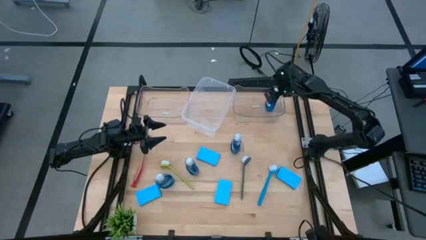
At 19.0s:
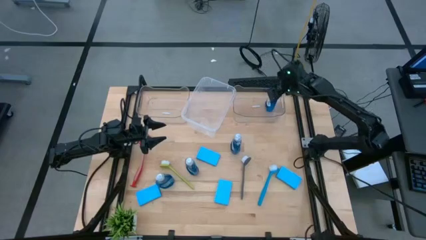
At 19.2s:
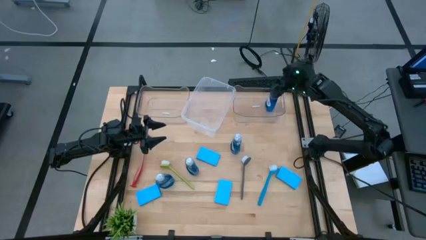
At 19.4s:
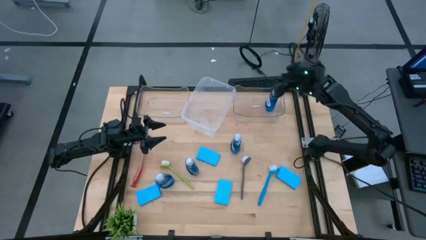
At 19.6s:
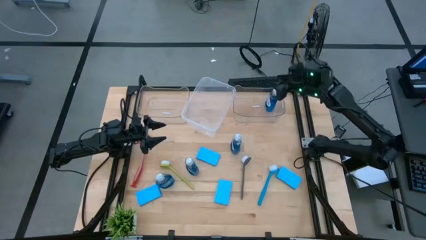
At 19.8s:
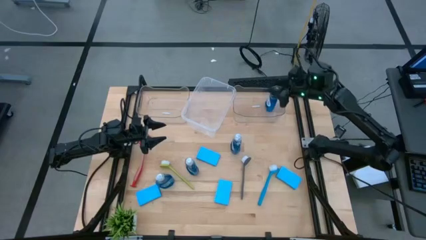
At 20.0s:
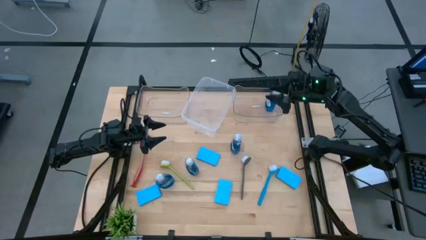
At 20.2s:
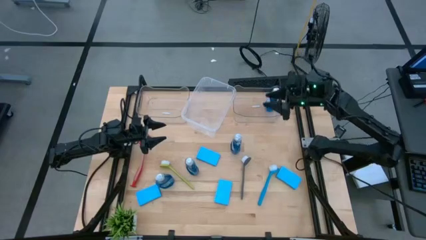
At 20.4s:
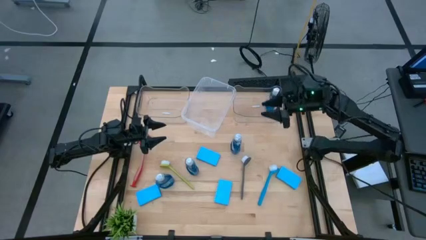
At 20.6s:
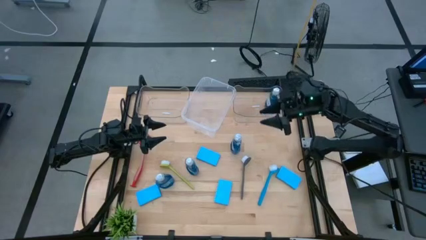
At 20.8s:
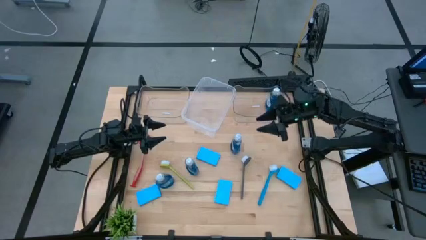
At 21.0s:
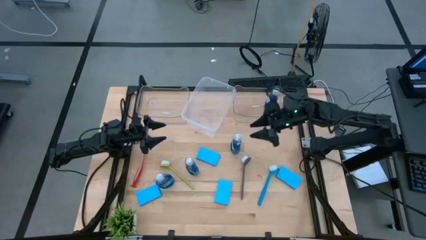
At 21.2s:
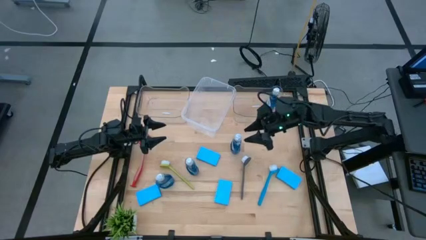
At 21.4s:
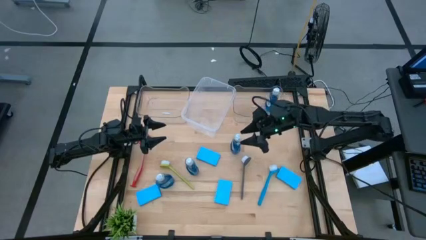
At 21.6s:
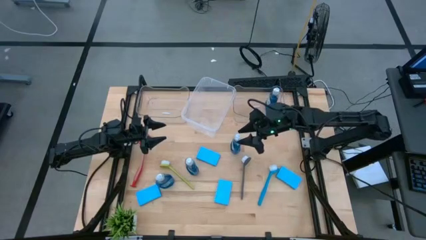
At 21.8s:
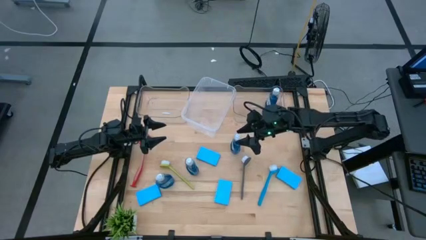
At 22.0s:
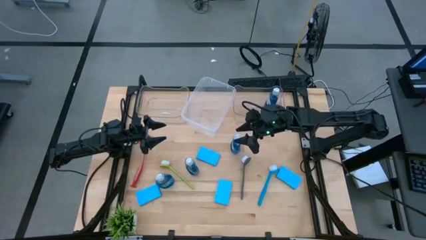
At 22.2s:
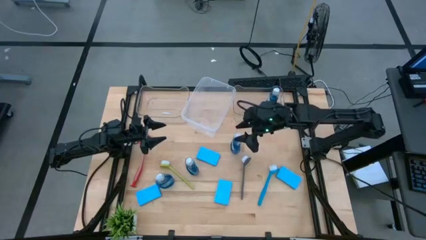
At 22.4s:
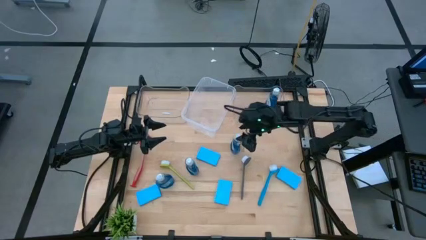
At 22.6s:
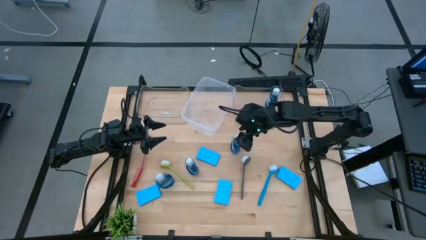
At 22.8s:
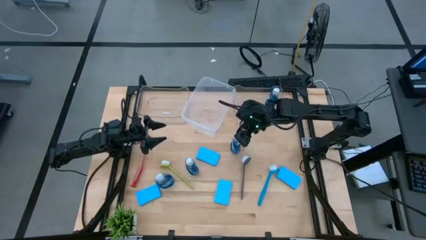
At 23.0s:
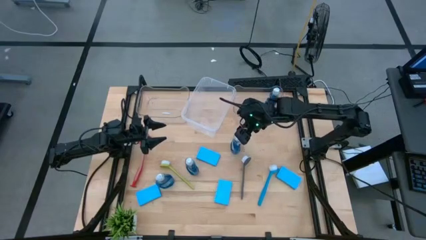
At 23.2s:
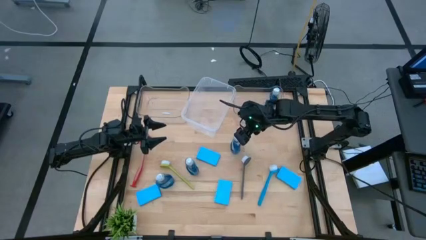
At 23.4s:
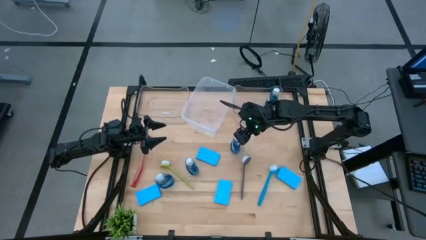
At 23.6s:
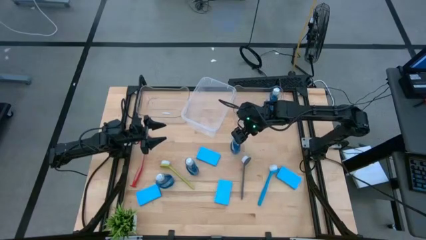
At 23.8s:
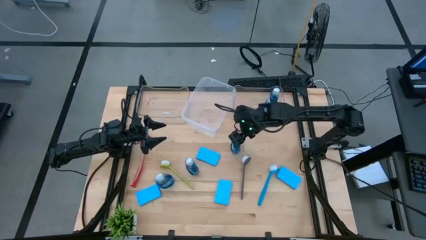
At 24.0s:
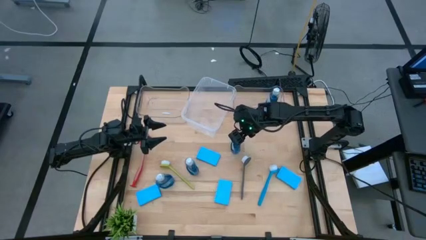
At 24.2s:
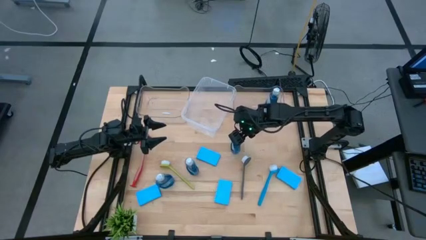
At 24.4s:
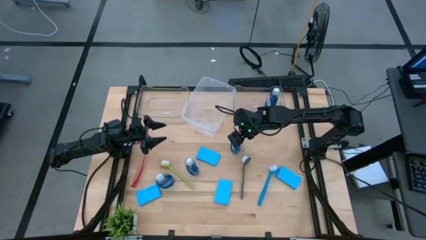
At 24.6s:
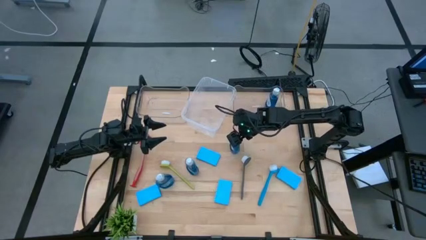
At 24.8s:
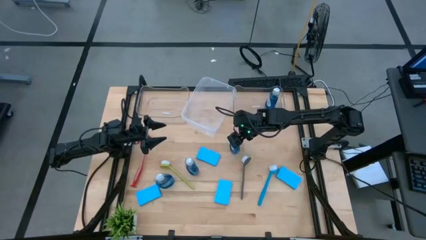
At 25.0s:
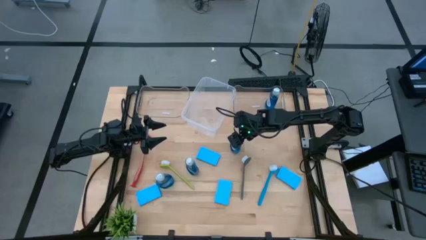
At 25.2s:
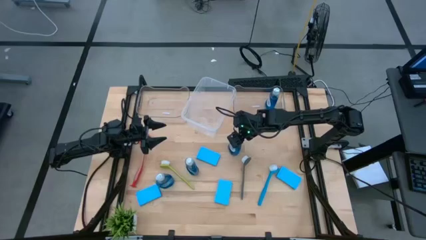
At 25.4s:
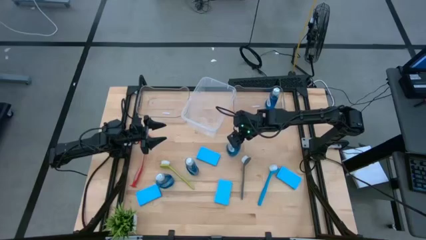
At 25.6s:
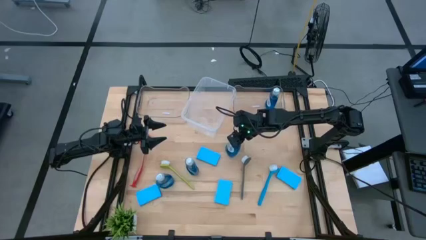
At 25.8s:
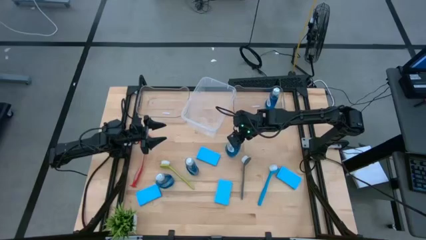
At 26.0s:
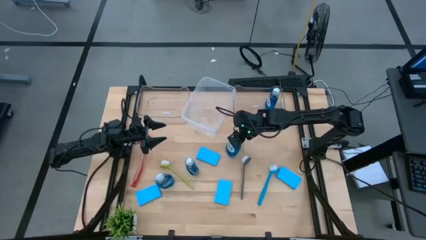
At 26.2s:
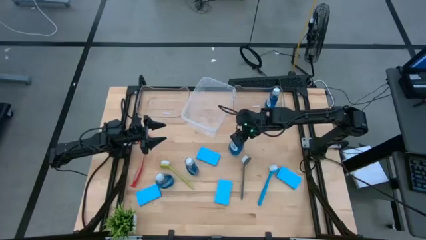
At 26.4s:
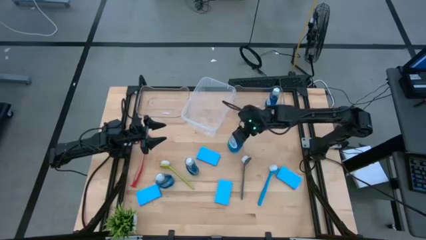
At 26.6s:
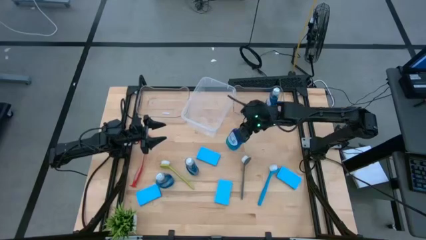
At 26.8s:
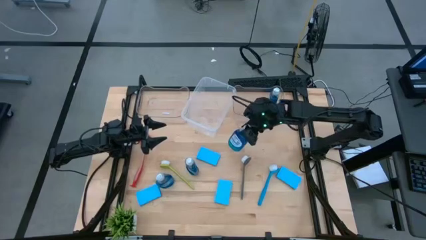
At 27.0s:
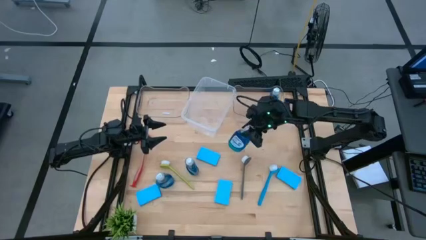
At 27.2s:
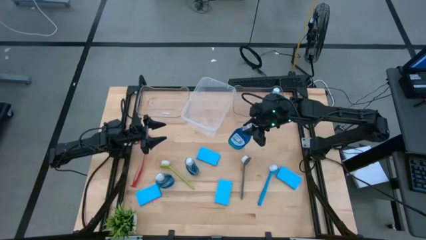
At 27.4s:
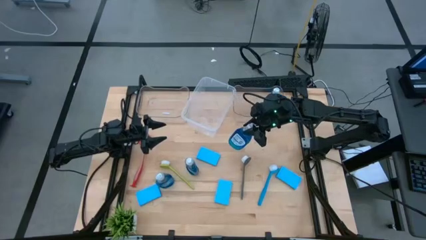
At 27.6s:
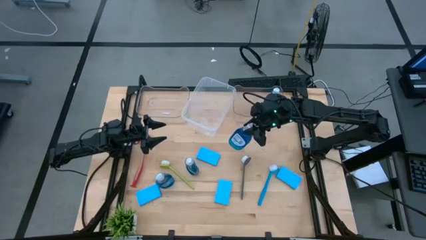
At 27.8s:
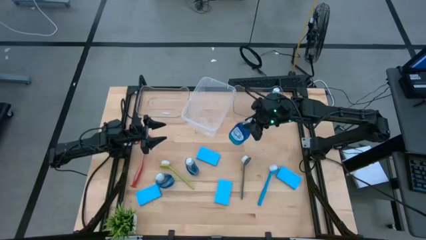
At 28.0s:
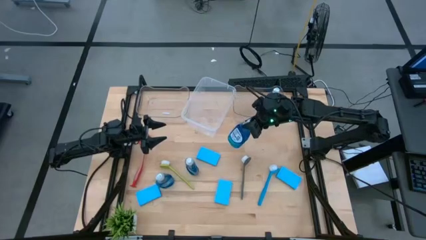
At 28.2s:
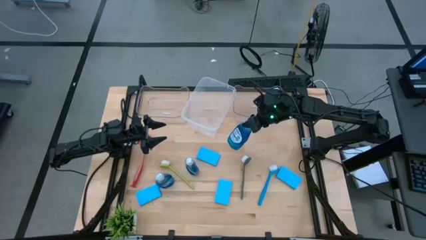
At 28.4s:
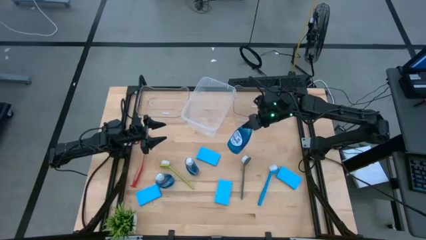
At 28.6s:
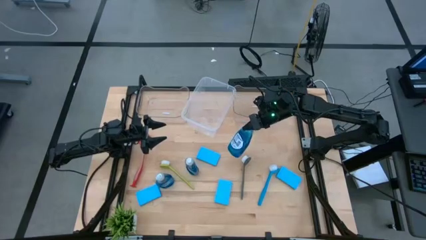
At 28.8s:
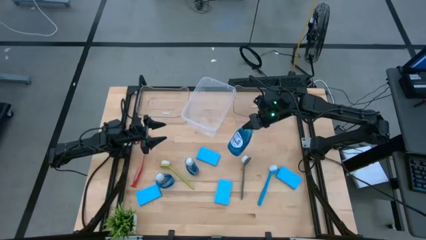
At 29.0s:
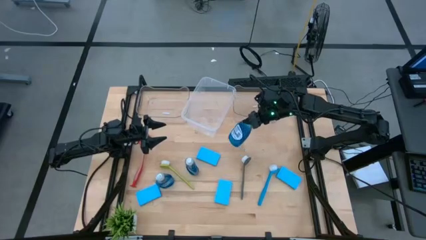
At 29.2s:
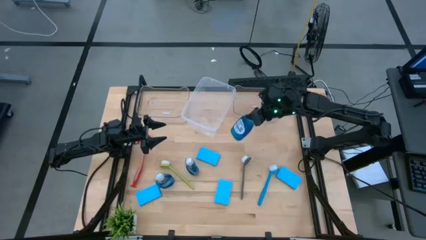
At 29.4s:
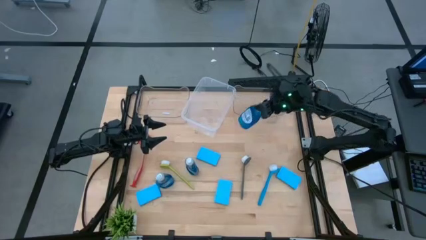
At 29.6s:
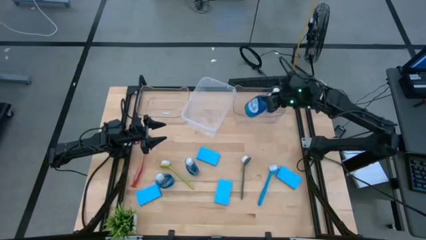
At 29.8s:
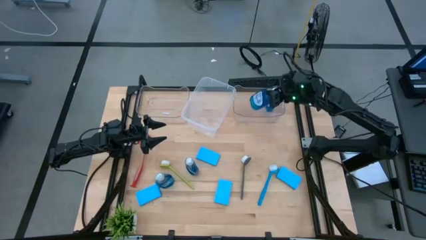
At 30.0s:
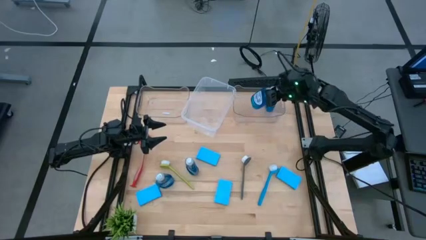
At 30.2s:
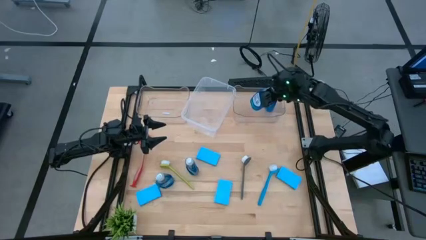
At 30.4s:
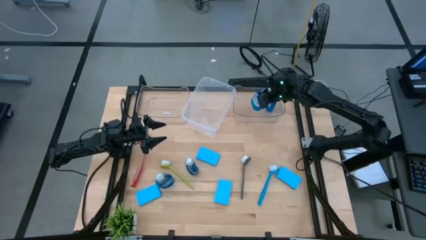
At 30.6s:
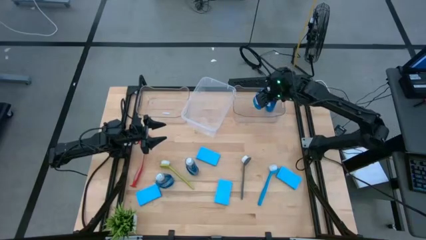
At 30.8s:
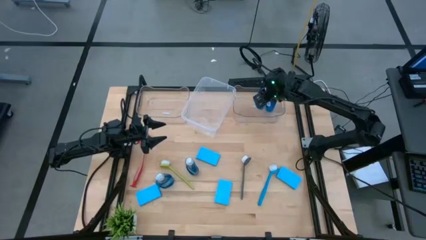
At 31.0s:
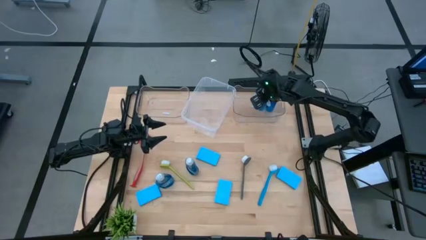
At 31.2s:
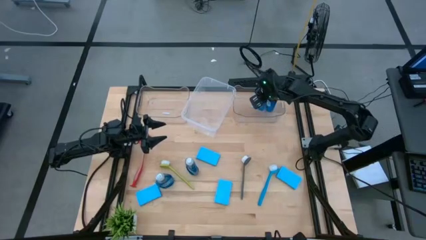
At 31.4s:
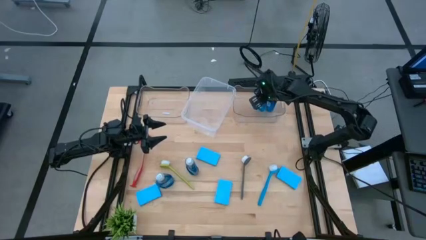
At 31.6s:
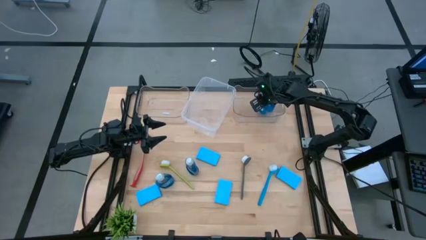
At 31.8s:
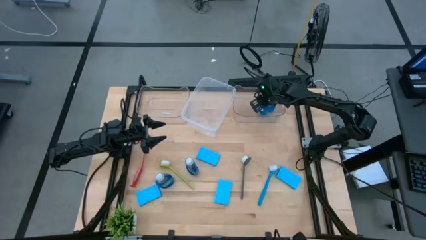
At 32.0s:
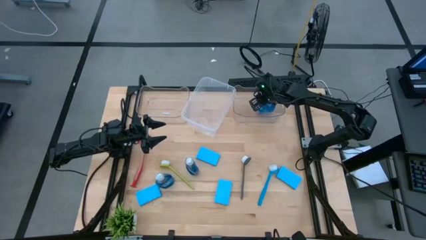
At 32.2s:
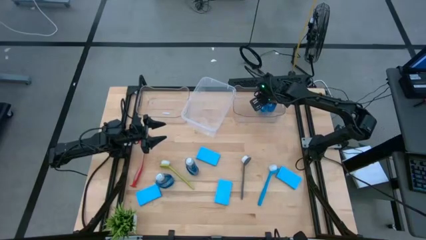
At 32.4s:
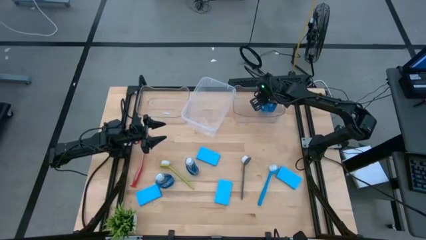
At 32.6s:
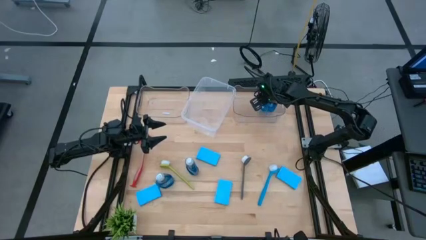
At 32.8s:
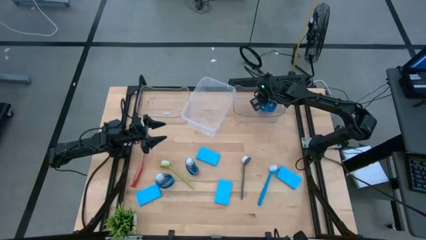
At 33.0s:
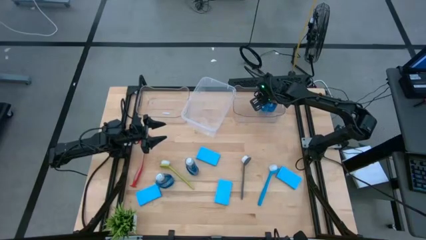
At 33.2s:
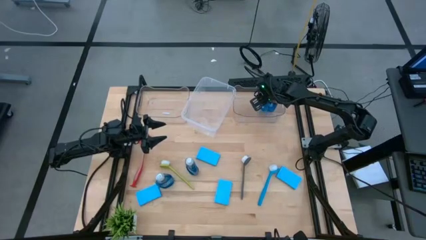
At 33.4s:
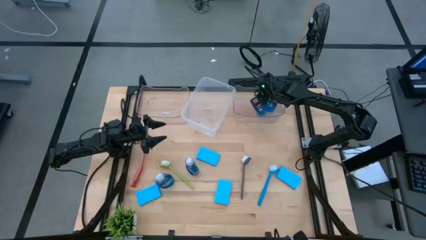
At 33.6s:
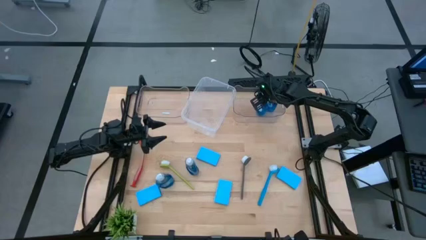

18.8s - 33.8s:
Task: Pick & Place Kitchen Sink Supplies
Put the blue dish soap into the right transparent bin
